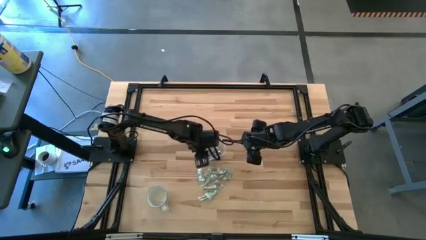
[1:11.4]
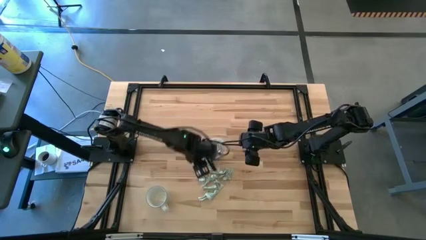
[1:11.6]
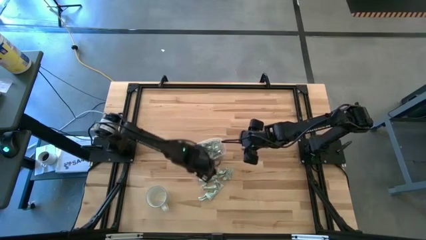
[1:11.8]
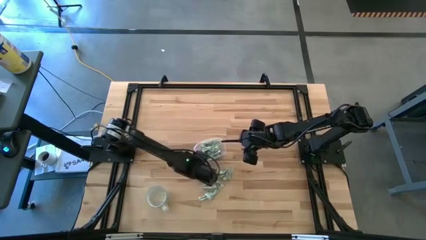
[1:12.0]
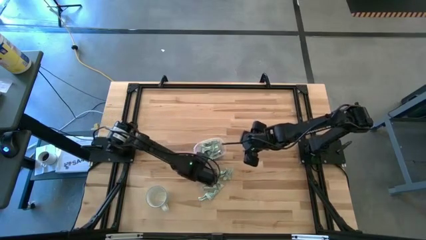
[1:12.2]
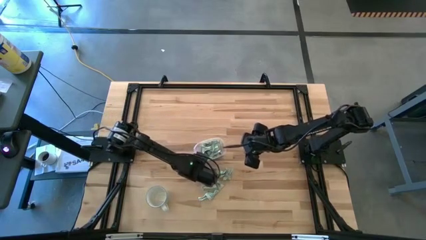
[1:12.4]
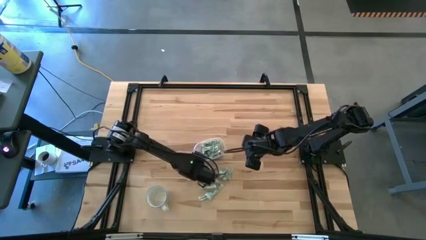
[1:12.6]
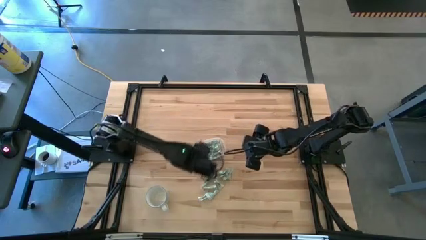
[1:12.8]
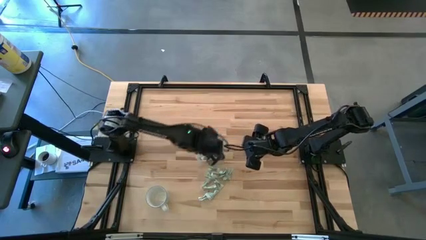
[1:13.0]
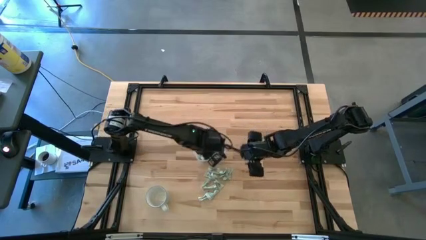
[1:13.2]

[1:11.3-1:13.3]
Task: Pick and place Stevia / Truvia into bins
Put the stevia packet into the transparent container

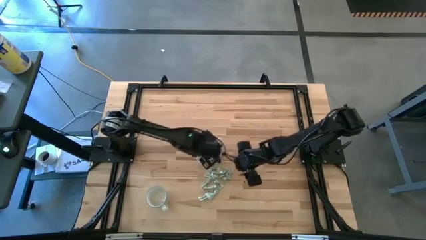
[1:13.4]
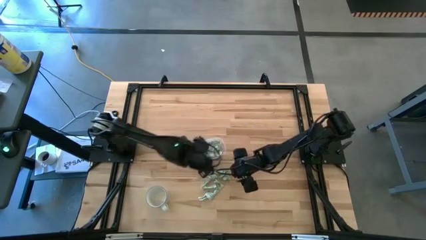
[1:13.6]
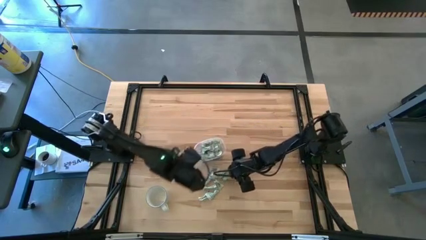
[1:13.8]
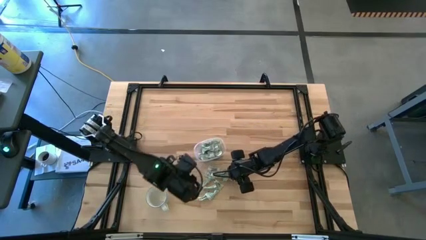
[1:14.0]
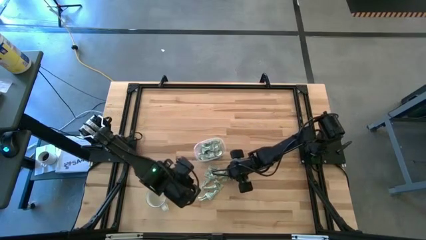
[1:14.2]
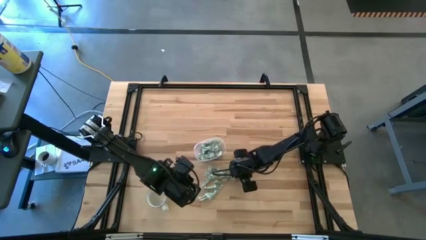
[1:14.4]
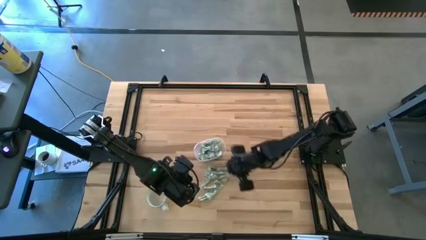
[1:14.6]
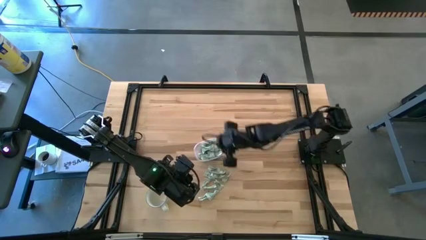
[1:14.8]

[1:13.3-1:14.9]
Put the stevia packet into the transparent container

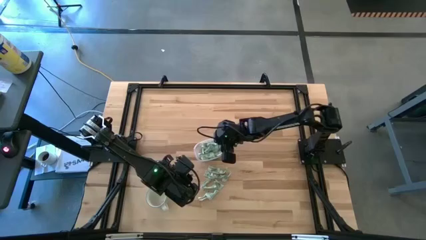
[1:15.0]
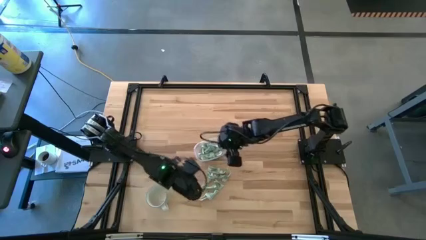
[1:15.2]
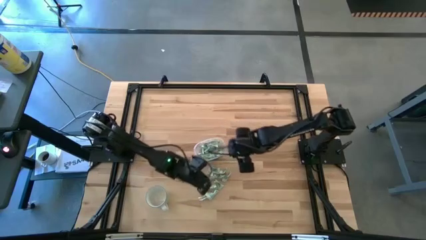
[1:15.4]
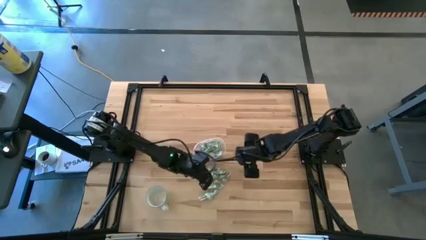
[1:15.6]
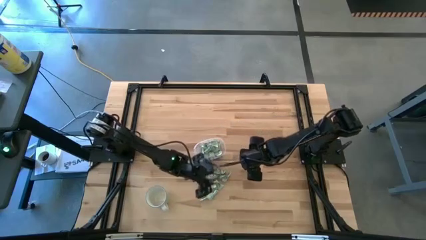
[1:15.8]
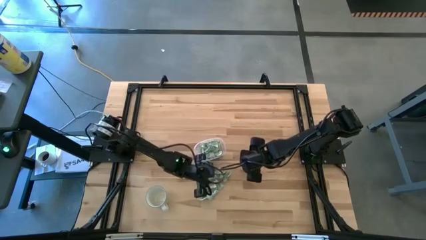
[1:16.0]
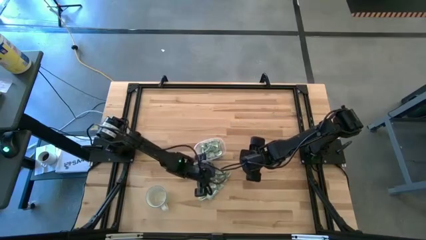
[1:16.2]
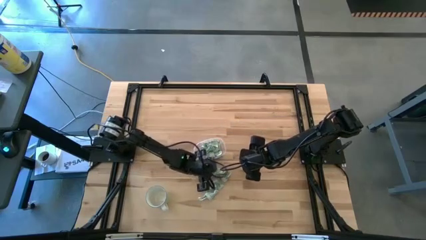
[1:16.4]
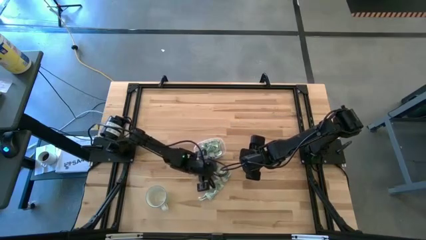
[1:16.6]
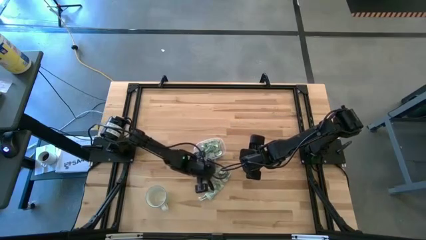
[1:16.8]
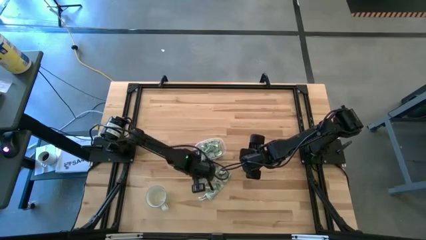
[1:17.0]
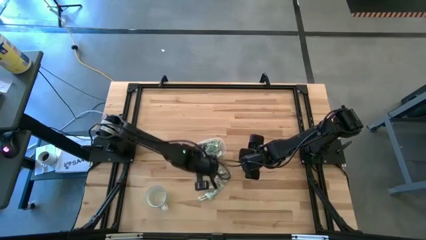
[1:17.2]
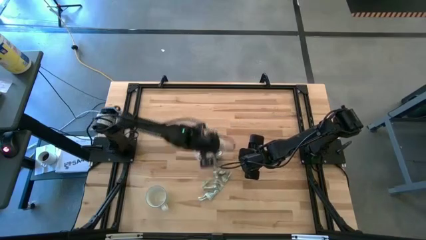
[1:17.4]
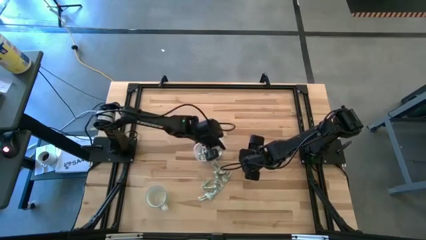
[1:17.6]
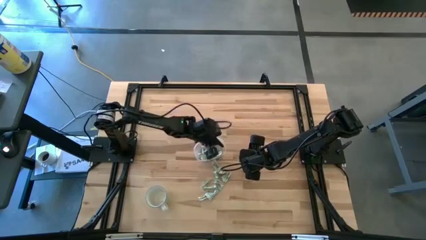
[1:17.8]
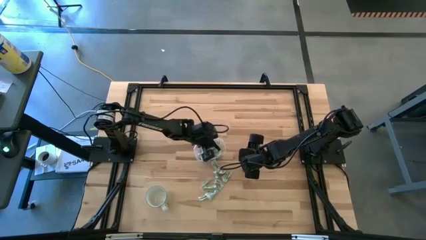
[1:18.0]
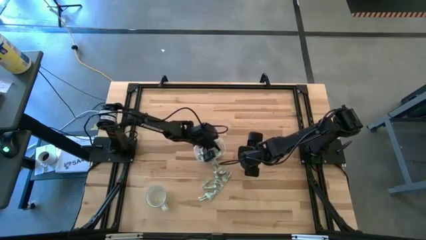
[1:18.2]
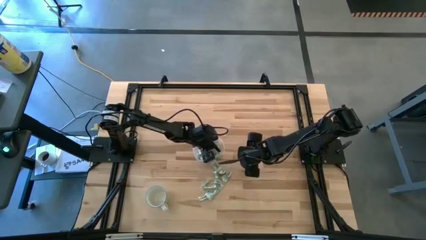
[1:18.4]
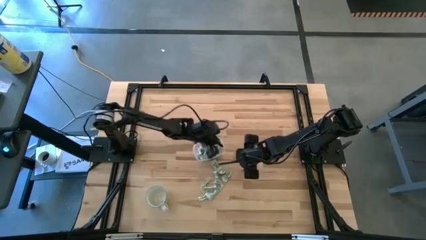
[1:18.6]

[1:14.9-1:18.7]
Put the stevia packet into the transparent container

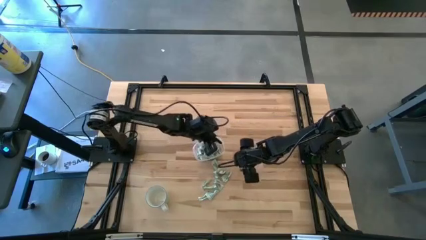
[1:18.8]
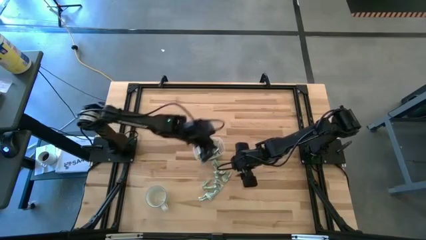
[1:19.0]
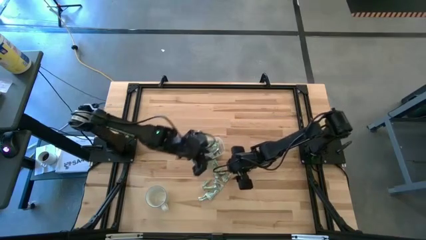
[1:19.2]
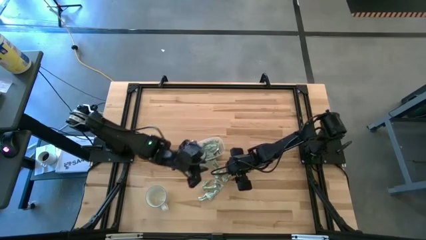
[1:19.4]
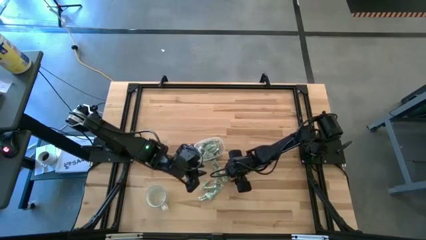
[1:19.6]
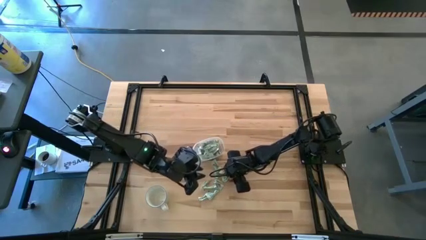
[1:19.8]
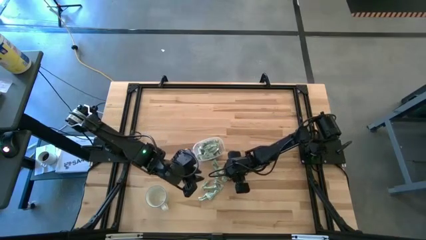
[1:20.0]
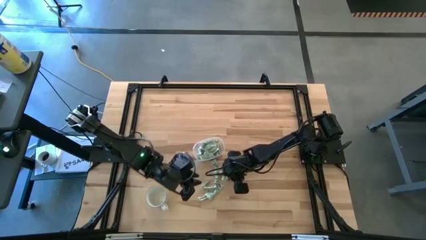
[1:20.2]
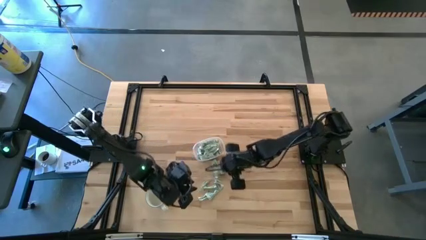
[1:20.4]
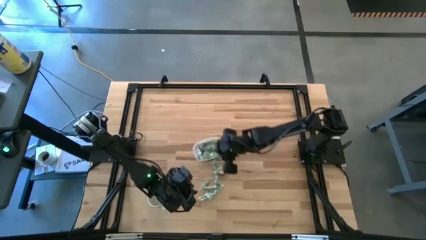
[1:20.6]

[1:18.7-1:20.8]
Put the stevia packet into the transparent container

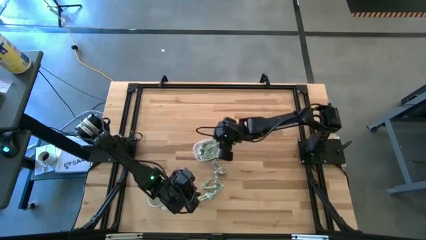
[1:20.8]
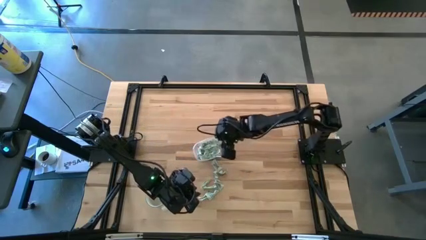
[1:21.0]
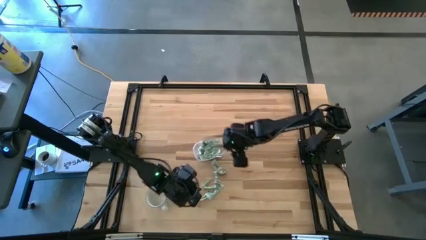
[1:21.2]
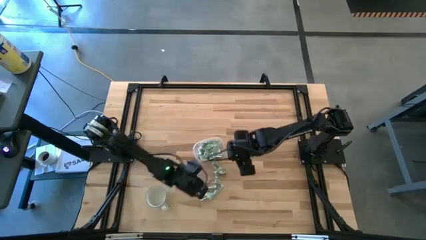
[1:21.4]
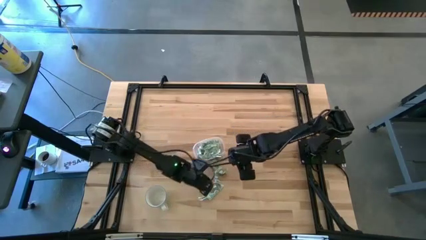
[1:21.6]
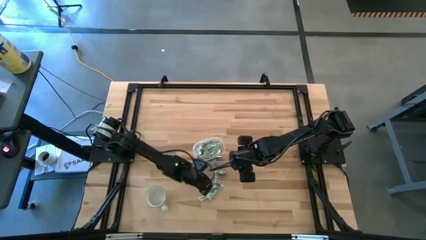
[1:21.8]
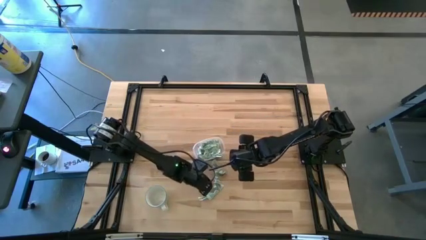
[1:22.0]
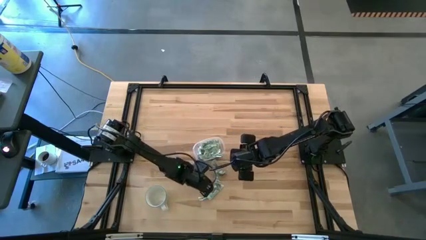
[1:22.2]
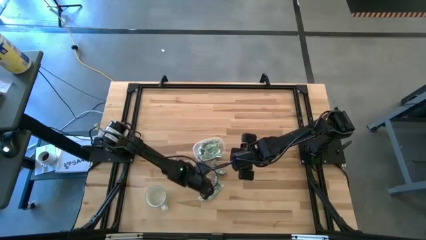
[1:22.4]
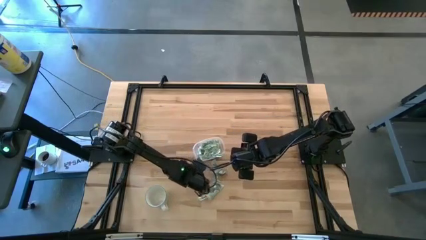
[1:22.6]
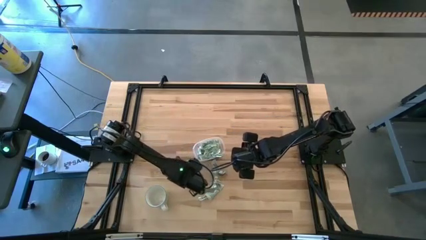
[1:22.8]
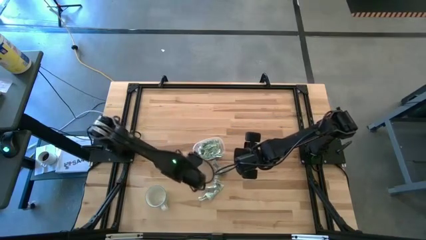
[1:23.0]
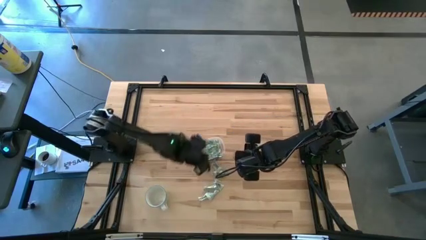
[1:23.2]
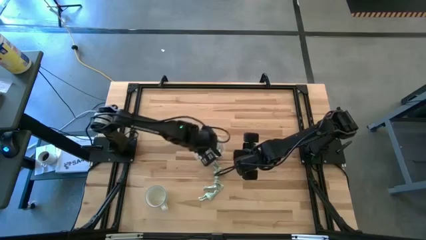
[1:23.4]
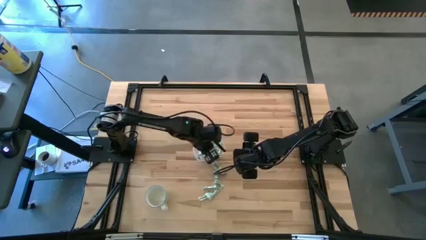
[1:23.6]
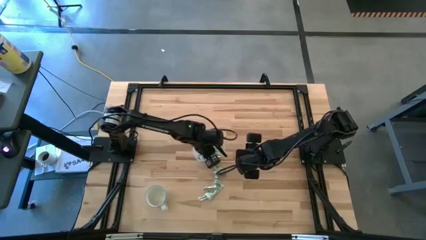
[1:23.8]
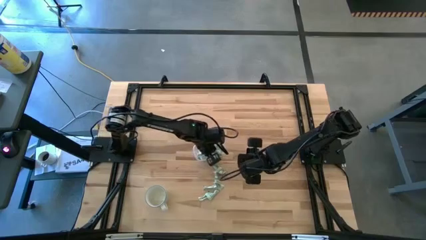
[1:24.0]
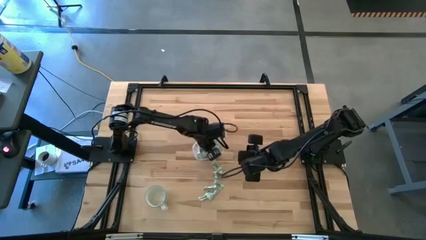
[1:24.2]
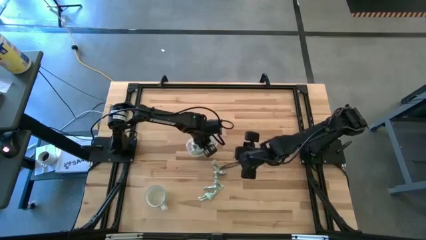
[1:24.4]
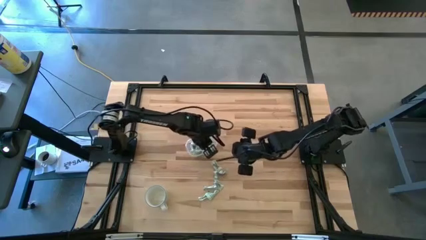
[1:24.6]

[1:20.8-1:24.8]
Put the stevia packet into the transparent container

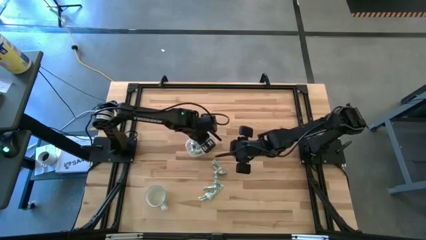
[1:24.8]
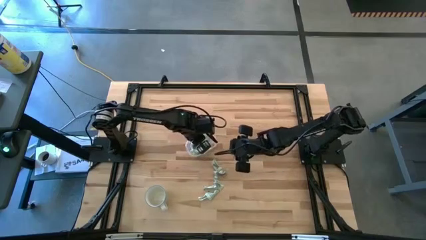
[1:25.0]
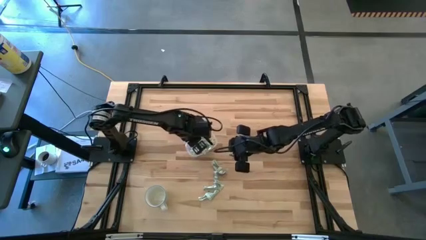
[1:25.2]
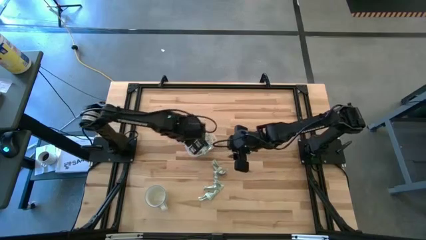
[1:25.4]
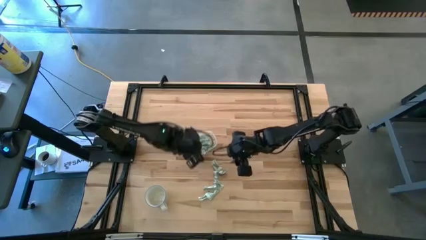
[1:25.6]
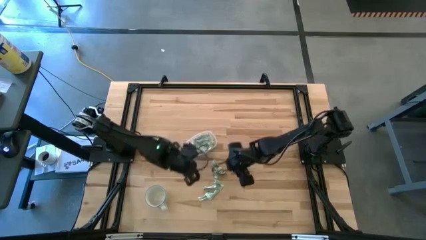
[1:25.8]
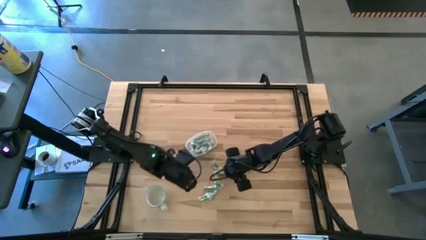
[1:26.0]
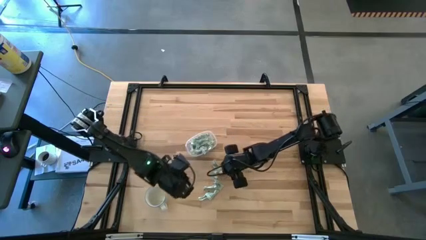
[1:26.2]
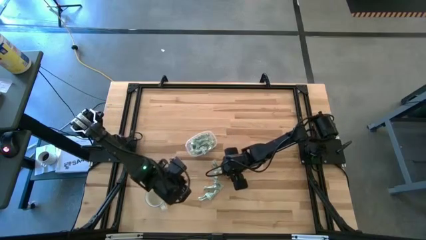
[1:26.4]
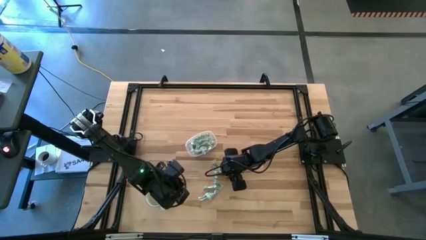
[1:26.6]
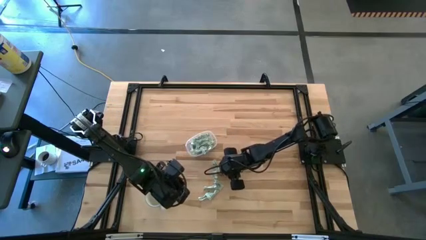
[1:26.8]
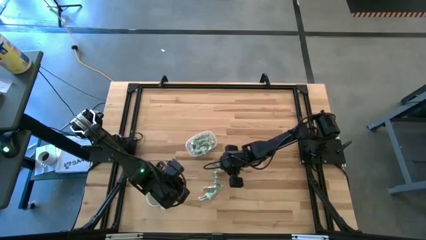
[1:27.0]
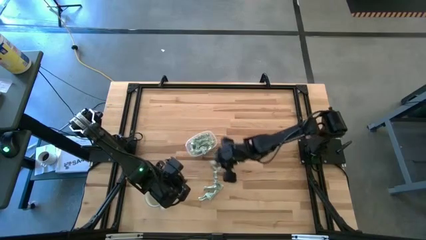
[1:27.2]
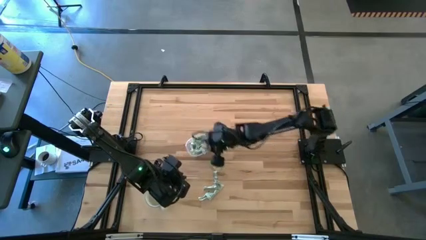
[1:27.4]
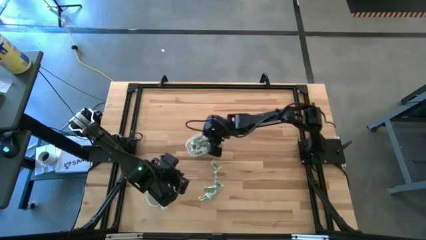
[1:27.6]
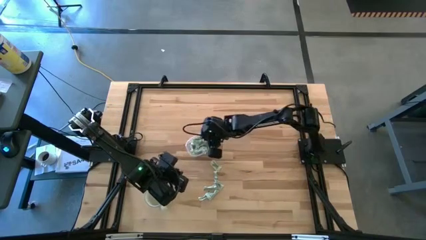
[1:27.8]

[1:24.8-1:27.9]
Put the stevia packet into the transparent container

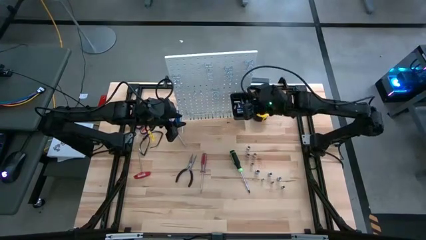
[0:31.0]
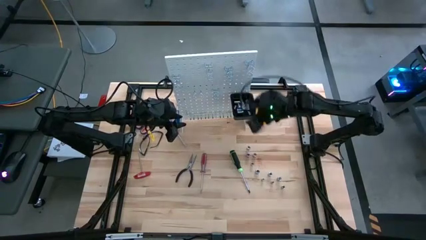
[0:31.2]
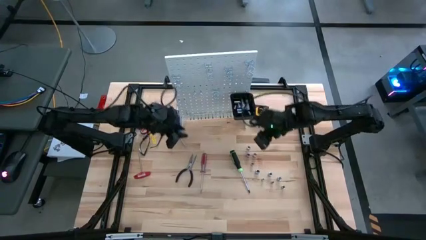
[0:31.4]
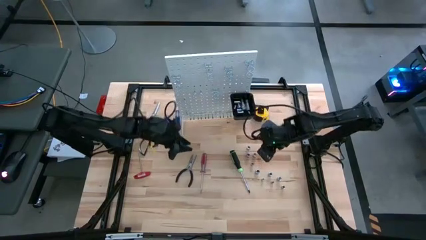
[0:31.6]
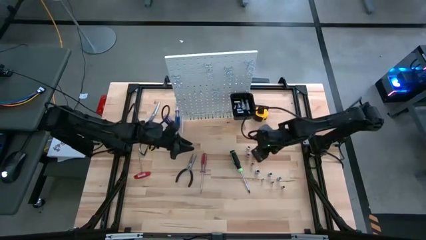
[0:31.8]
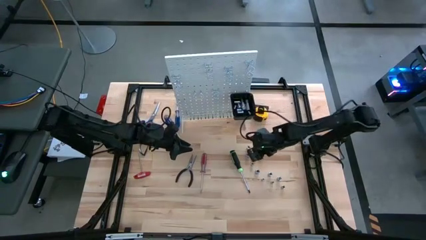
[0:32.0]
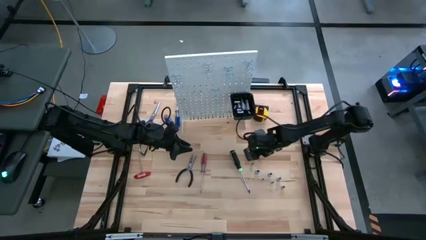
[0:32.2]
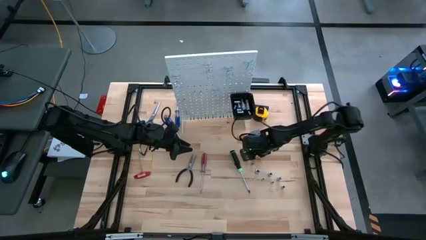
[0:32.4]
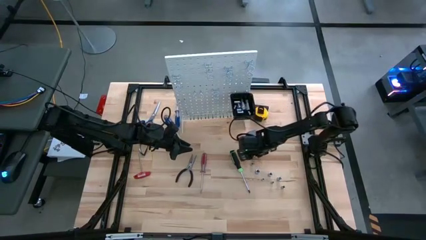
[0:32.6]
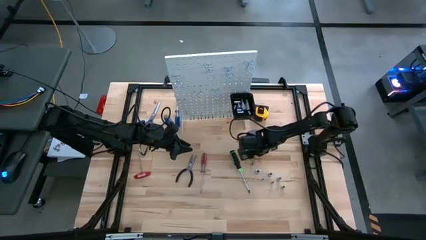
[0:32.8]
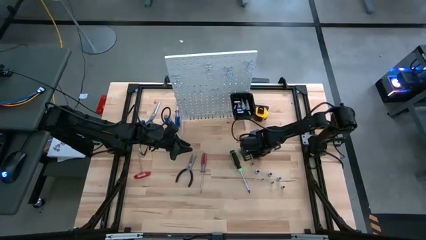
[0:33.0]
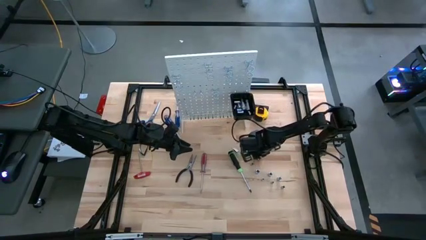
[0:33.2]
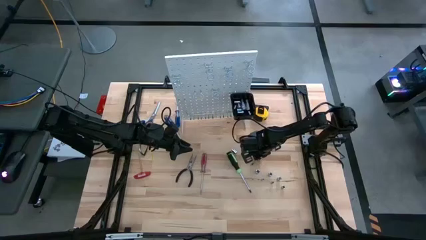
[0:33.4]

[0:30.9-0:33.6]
Task: Hang tools onto peg board
Put the silver socket into the black bin on the peg board
